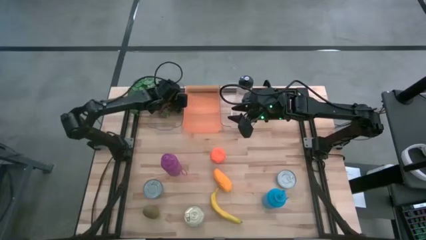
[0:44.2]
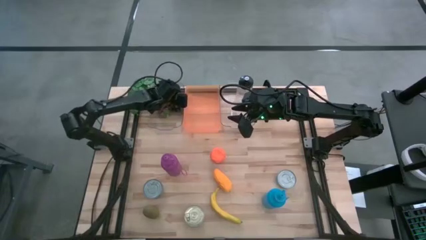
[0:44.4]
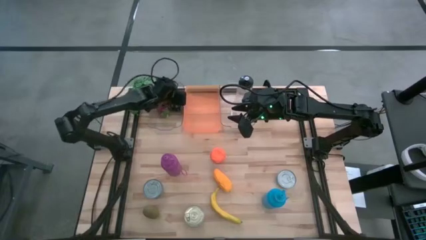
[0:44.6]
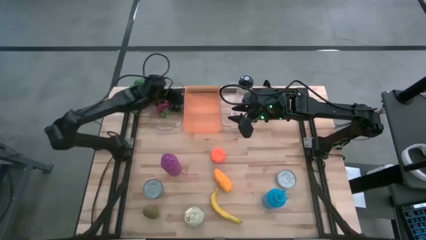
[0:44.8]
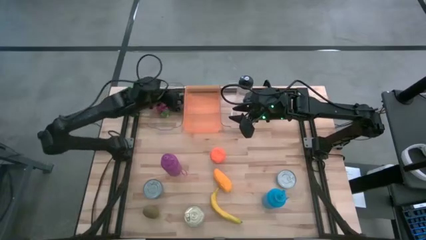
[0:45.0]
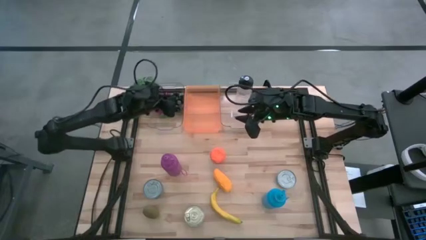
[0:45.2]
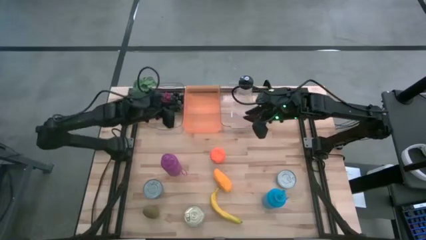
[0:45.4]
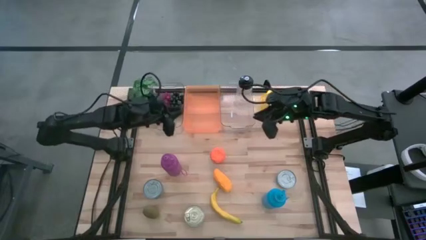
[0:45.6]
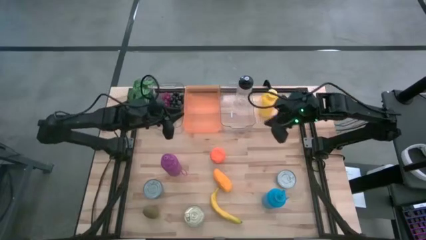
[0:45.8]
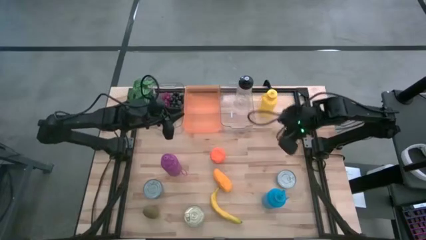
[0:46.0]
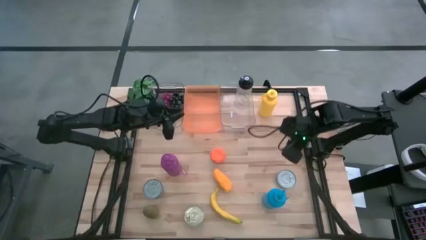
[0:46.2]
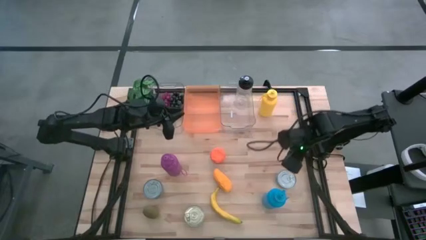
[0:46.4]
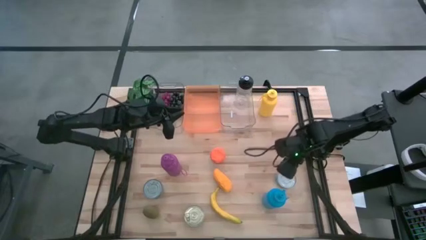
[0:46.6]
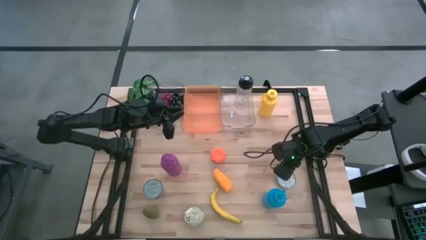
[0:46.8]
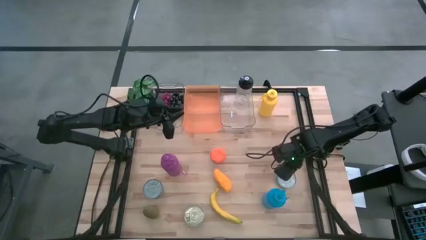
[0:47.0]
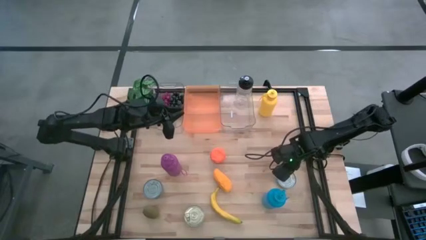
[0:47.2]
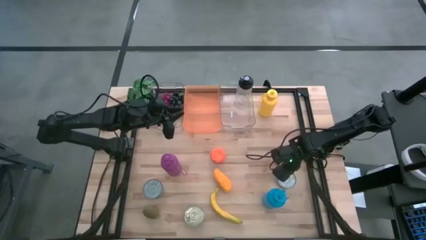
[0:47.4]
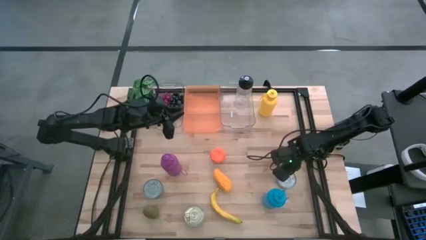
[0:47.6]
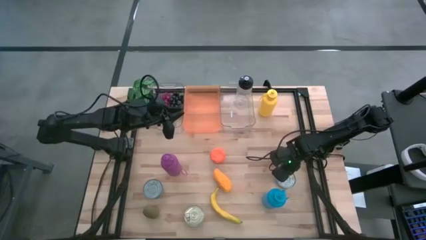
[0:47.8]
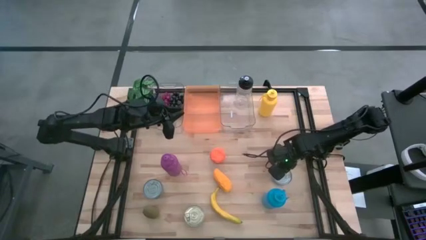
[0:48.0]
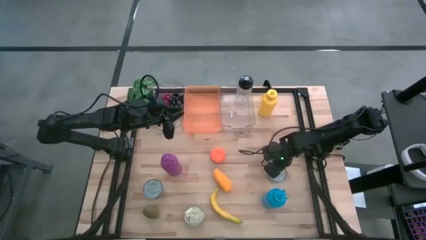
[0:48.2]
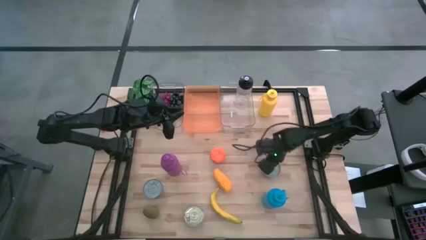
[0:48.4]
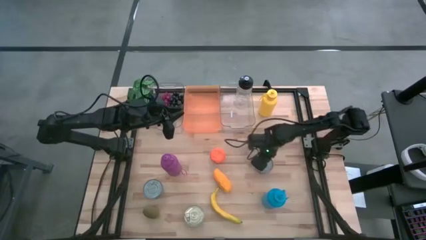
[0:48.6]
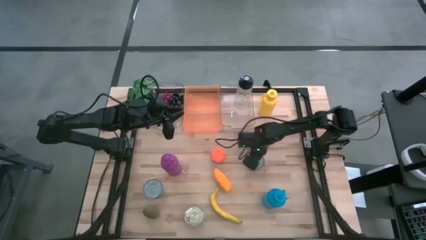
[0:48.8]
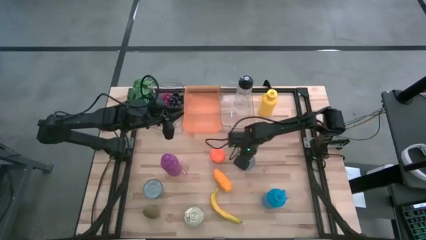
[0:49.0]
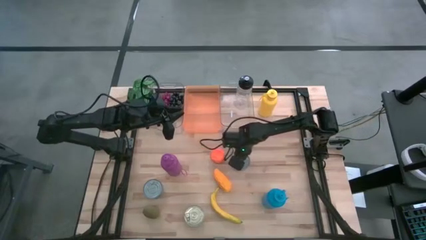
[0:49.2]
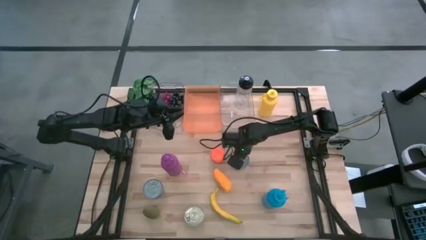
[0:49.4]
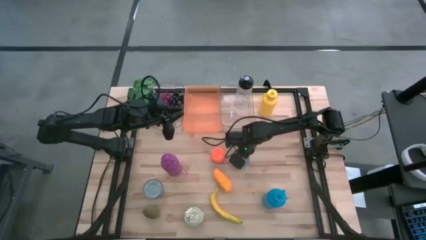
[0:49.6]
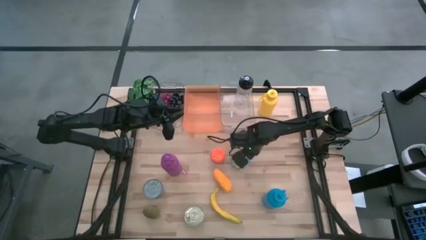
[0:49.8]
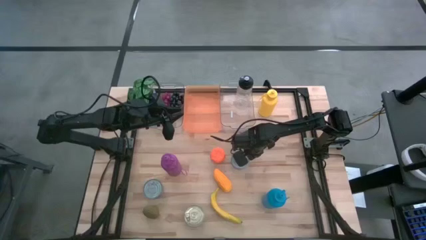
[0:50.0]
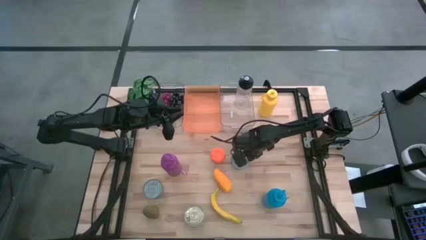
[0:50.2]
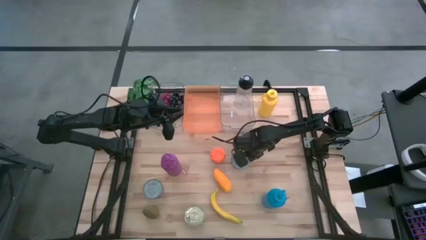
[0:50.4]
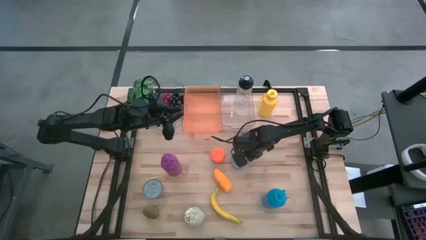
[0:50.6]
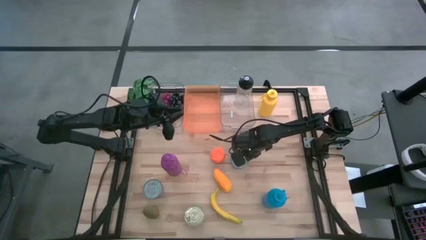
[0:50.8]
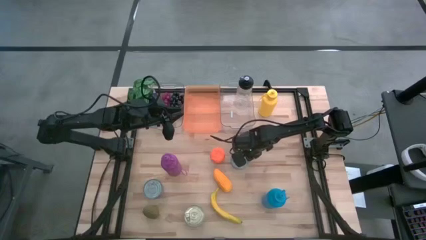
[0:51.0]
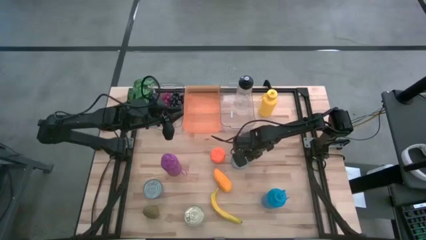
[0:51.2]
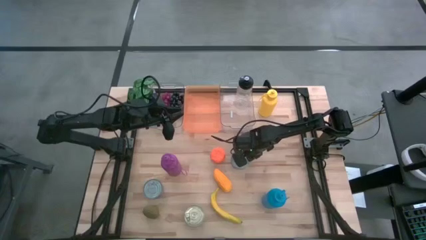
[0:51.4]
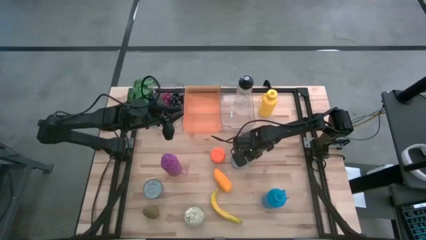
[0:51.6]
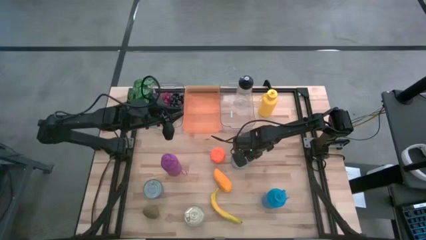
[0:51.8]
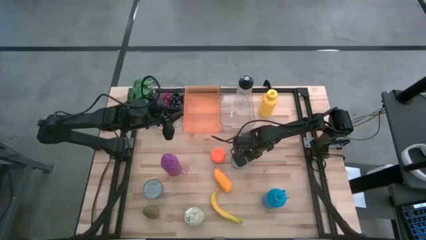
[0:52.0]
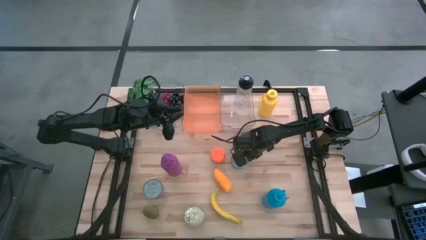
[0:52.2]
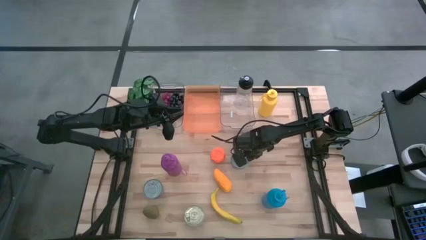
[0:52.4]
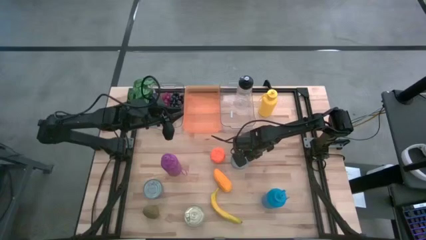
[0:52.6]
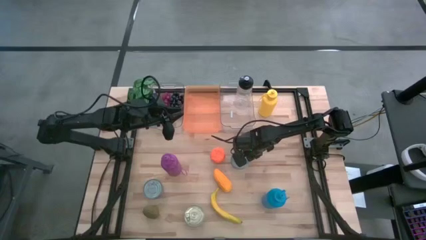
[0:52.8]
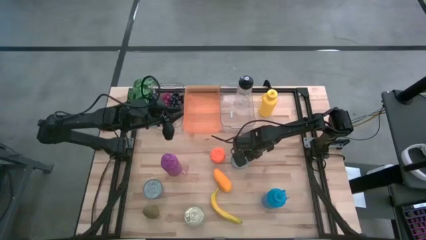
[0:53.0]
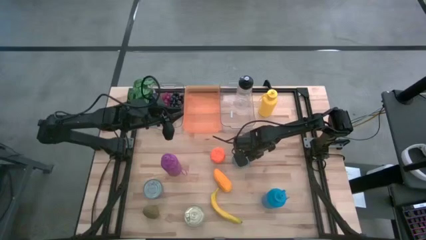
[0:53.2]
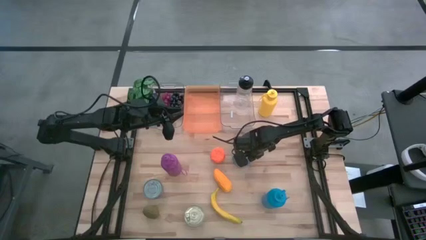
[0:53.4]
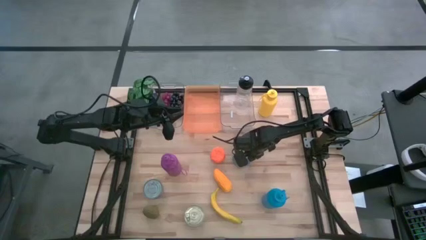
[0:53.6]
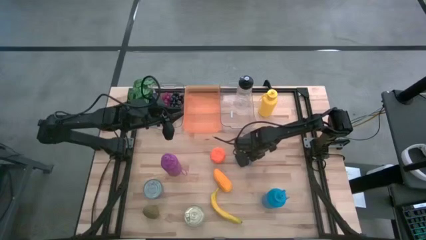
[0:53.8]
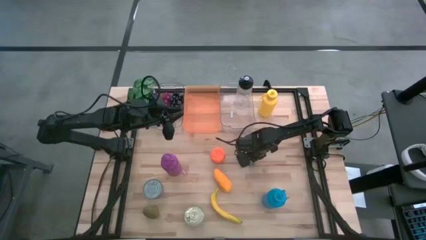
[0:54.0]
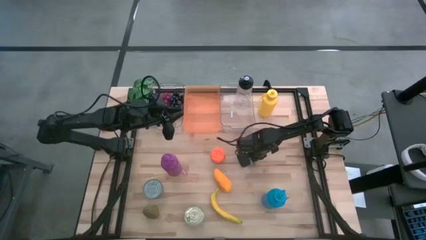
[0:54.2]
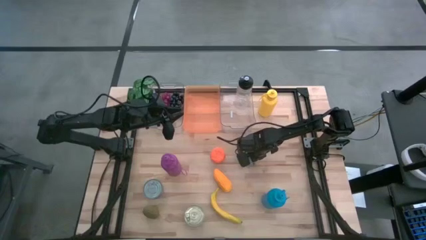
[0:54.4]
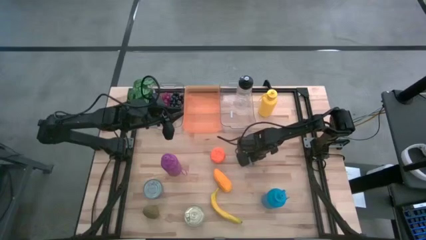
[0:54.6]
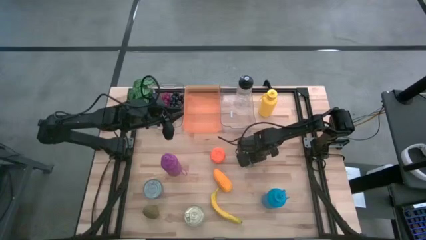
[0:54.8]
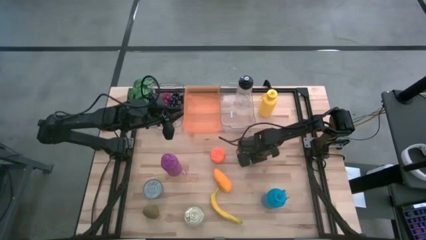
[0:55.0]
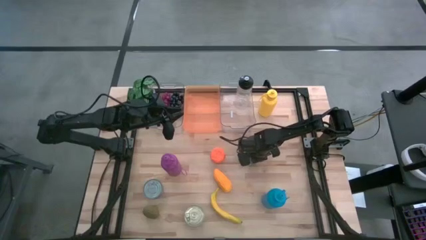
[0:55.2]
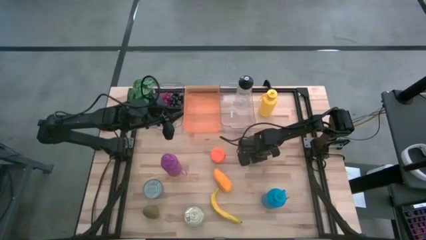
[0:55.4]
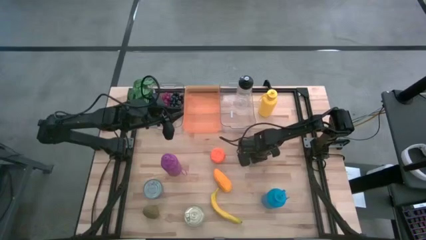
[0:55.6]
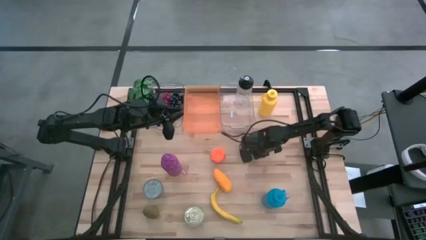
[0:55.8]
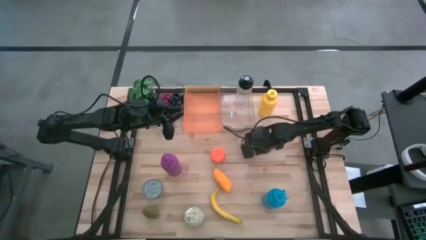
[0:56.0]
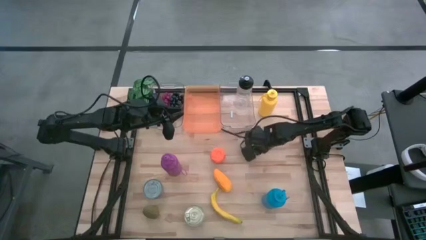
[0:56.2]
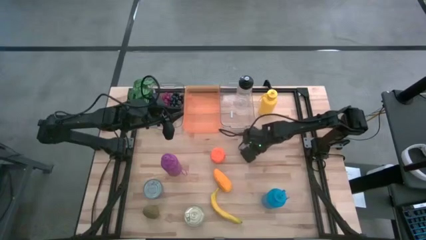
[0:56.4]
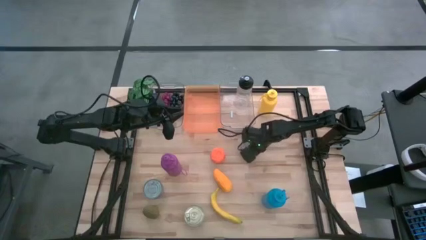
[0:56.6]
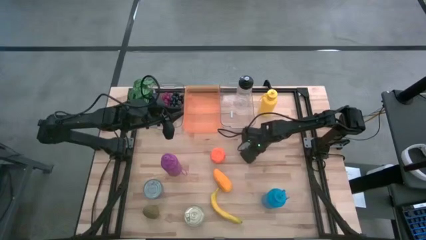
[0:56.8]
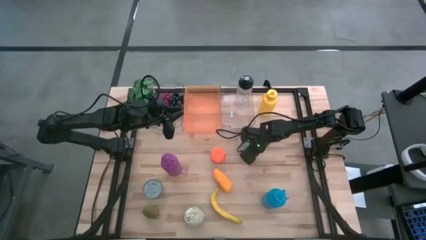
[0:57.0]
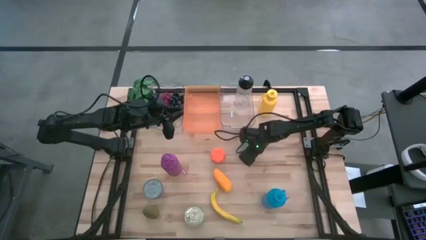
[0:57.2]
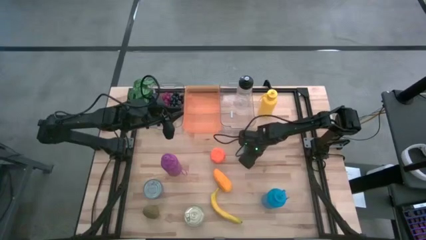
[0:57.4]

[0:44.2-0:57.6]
Task: Pick & Place Food Item
Put the yellow and blue tuna can into the orange bin

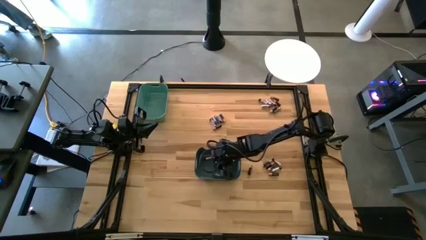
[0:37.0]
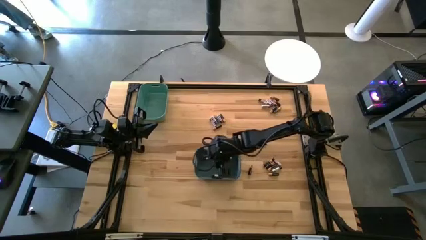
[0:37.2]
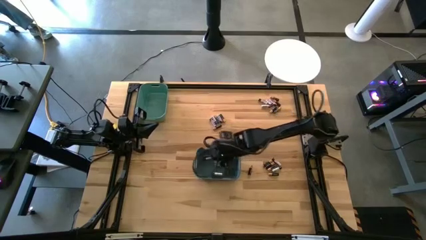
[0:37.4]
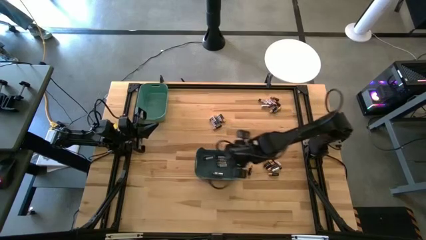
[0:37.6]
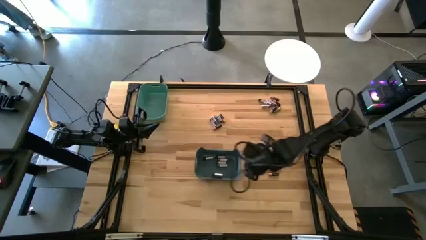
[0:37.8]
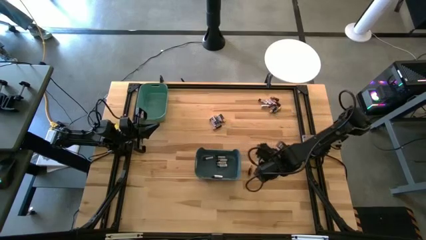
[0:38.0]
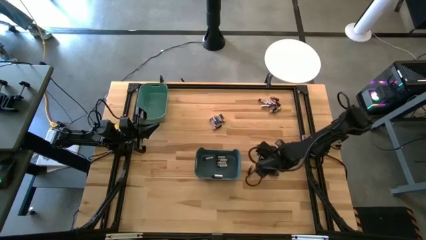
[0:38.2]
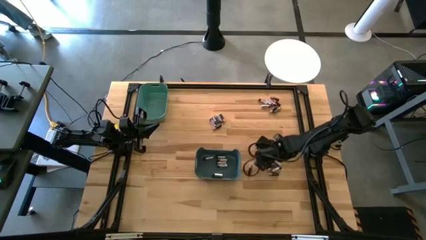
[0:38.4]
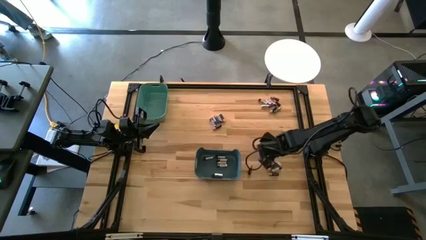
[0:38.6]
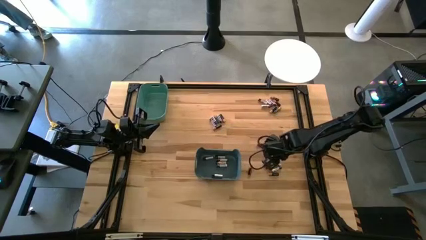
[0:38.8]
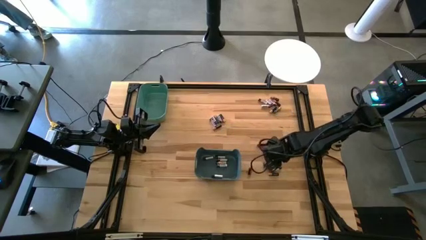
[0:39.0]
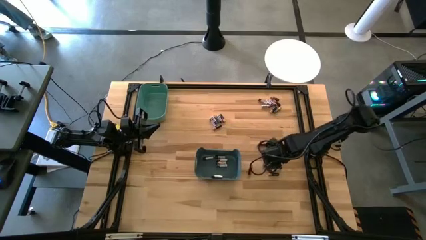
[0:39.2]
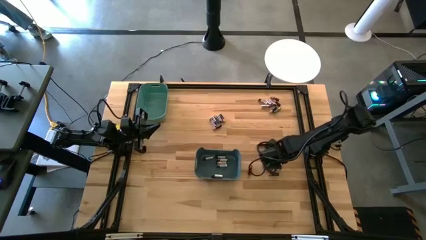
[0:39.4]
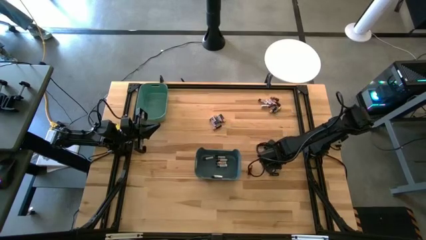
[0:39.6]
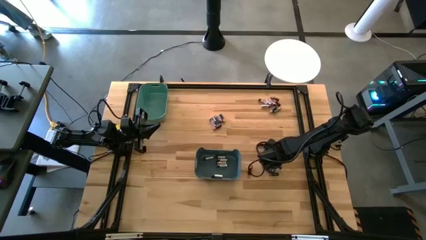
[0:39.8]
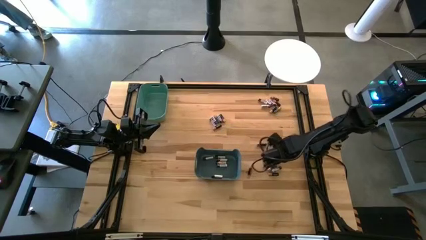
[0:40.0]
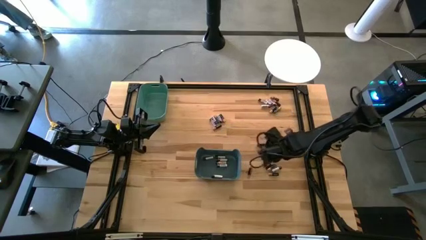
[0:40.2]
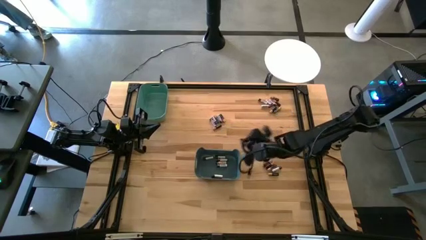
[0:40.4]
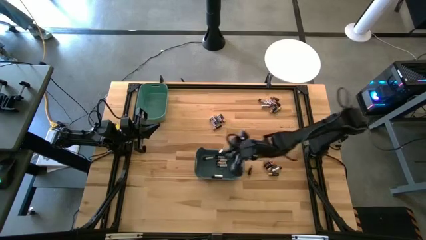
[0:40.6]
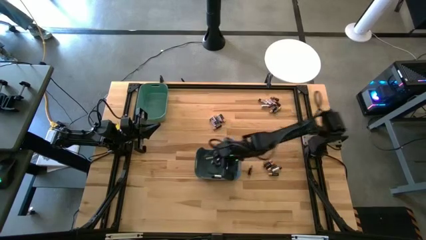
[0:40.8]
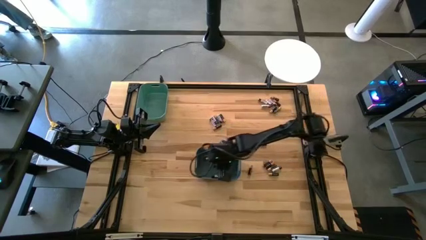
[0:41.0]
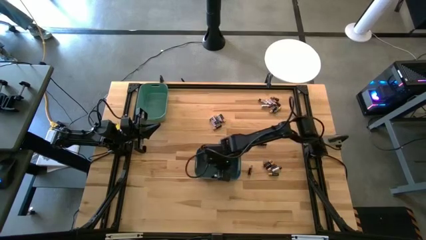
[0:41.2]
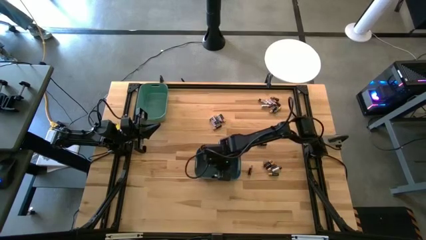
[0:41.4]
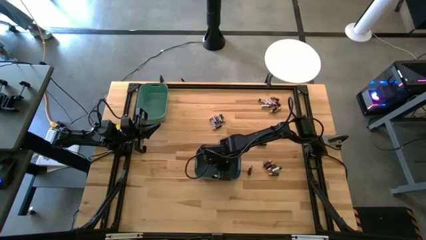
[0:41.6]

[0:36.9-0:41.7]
Task: Sort batteries
Put the silver battery into the blue bin
